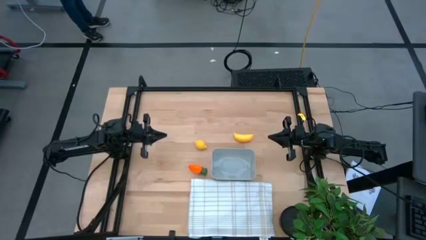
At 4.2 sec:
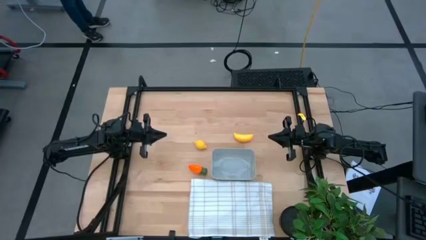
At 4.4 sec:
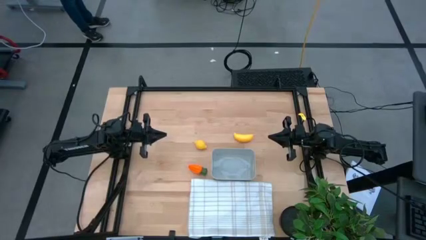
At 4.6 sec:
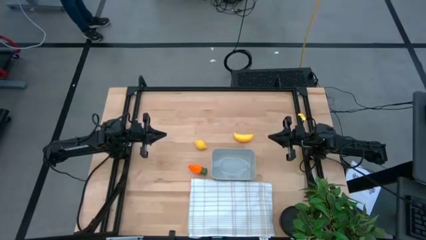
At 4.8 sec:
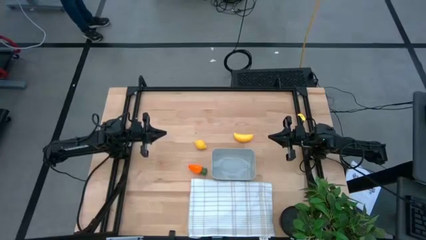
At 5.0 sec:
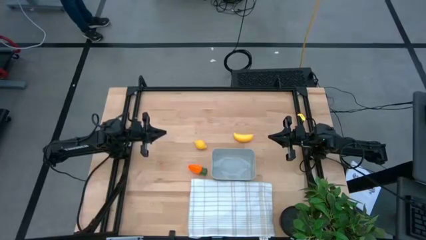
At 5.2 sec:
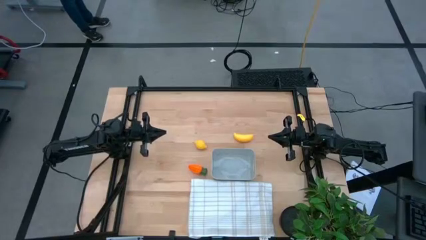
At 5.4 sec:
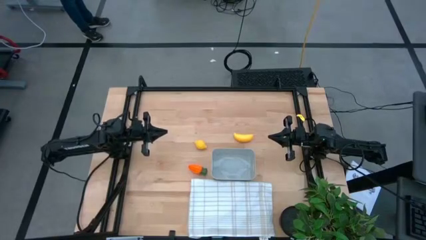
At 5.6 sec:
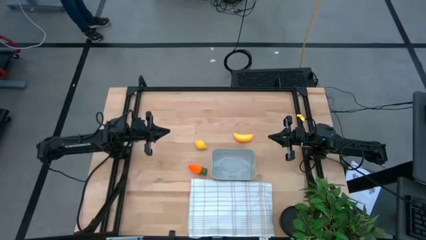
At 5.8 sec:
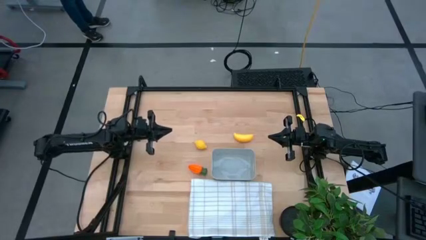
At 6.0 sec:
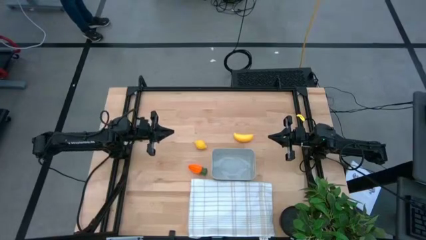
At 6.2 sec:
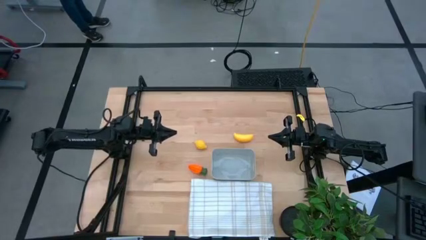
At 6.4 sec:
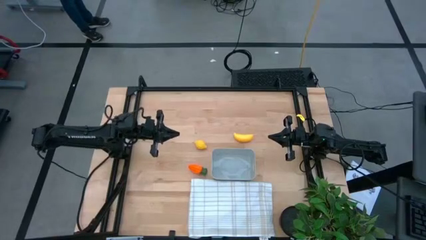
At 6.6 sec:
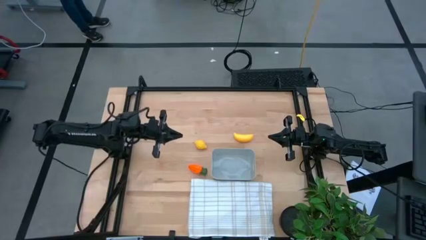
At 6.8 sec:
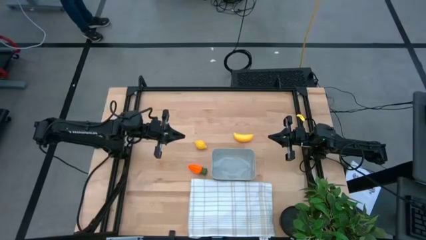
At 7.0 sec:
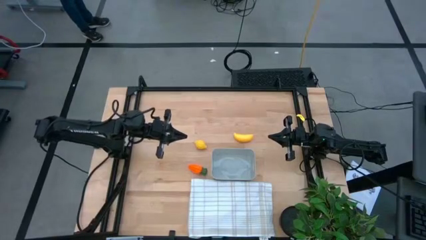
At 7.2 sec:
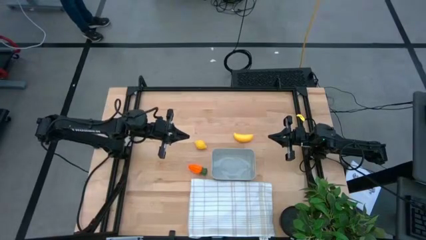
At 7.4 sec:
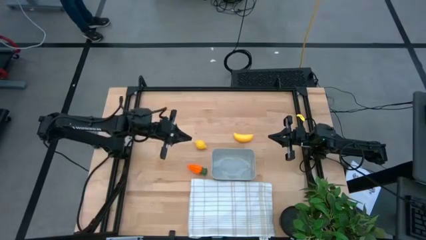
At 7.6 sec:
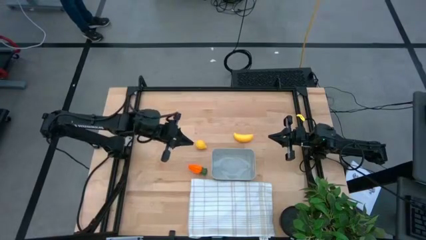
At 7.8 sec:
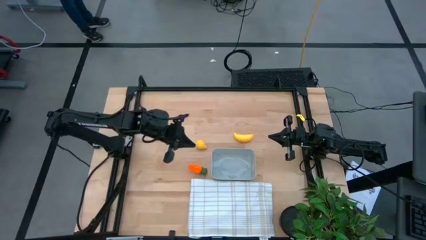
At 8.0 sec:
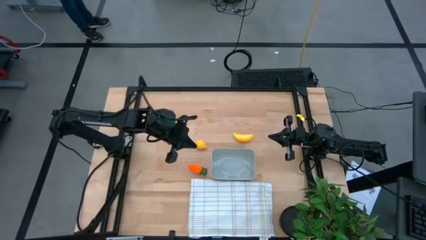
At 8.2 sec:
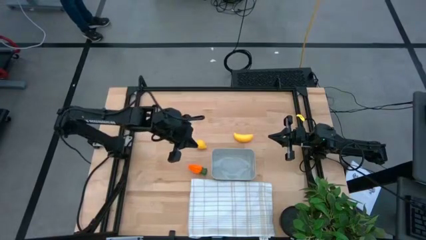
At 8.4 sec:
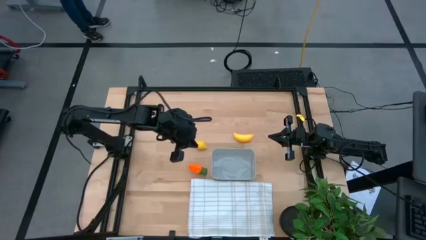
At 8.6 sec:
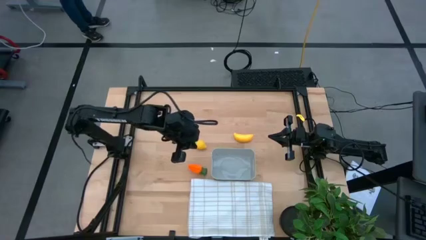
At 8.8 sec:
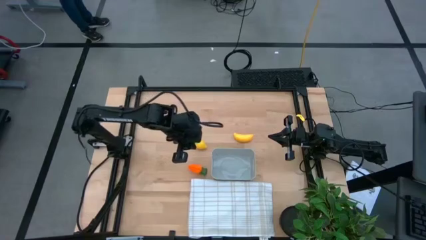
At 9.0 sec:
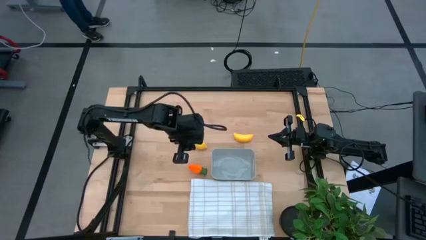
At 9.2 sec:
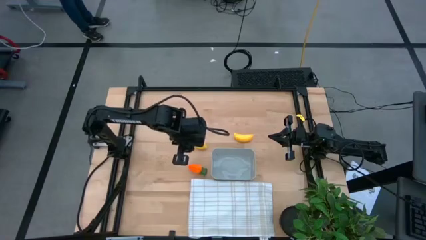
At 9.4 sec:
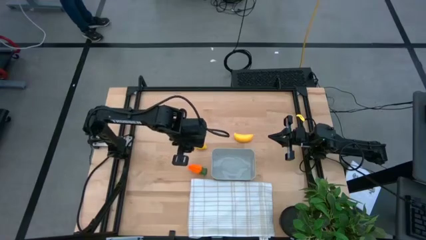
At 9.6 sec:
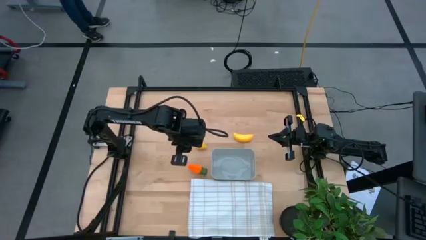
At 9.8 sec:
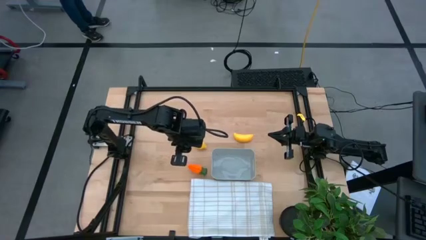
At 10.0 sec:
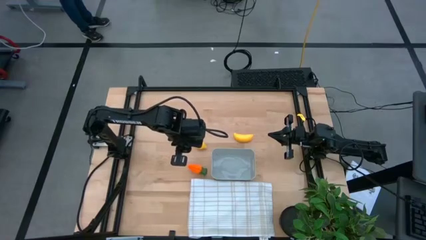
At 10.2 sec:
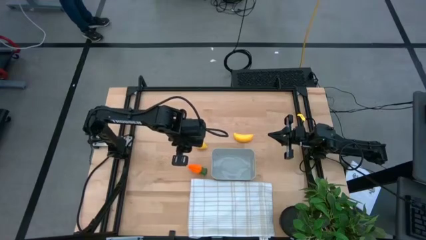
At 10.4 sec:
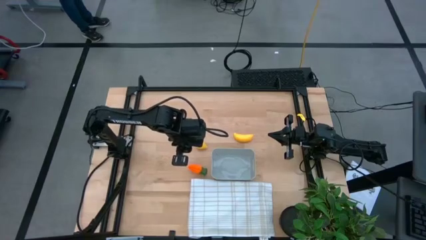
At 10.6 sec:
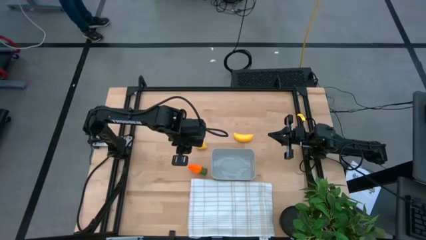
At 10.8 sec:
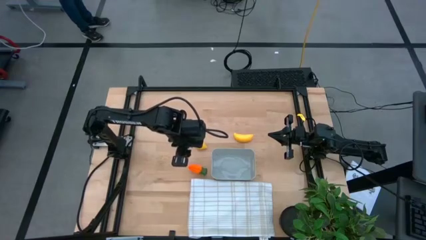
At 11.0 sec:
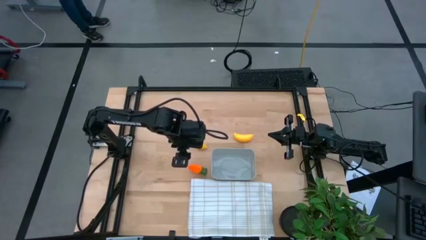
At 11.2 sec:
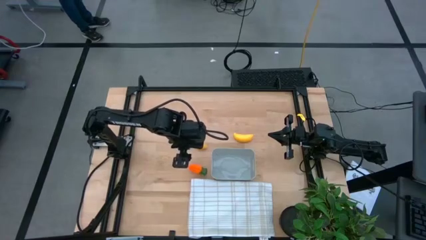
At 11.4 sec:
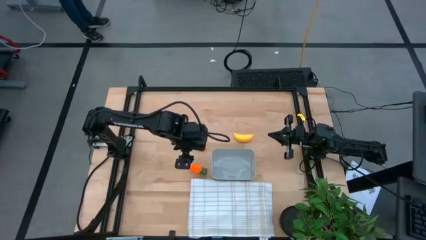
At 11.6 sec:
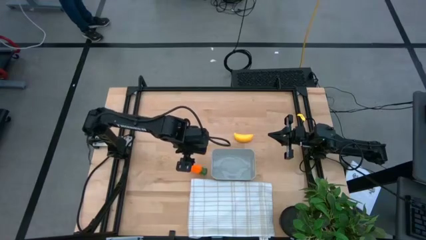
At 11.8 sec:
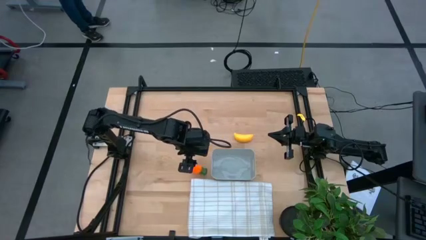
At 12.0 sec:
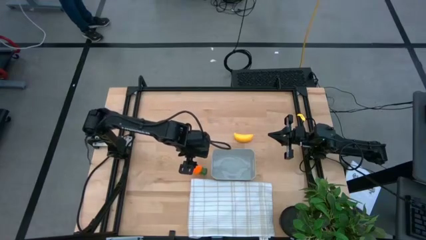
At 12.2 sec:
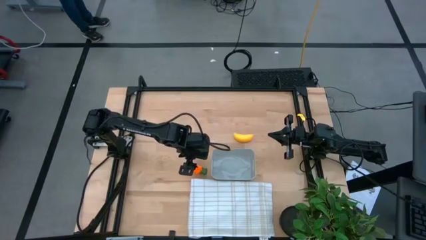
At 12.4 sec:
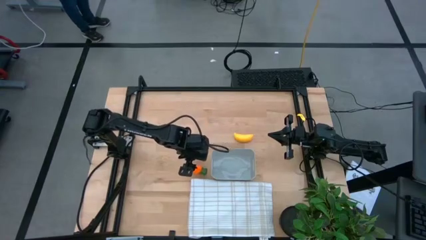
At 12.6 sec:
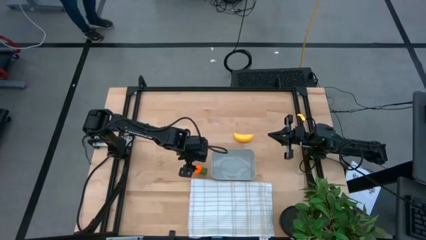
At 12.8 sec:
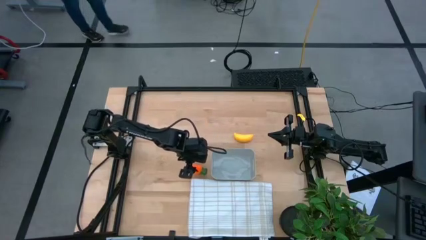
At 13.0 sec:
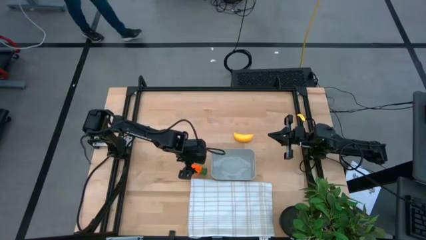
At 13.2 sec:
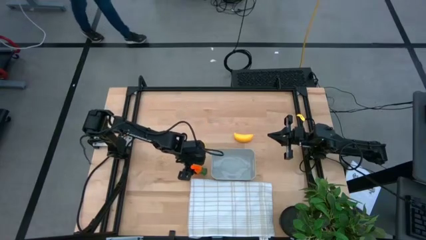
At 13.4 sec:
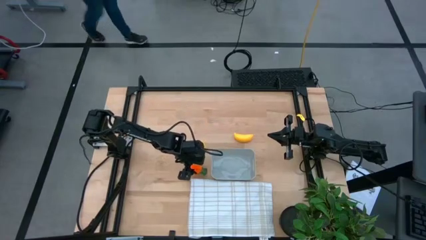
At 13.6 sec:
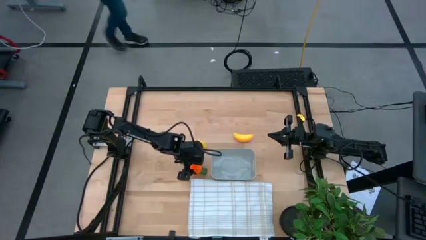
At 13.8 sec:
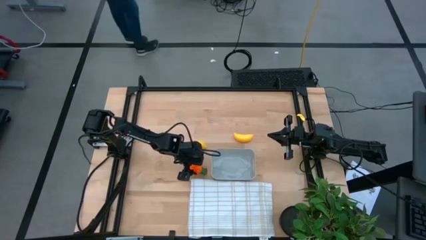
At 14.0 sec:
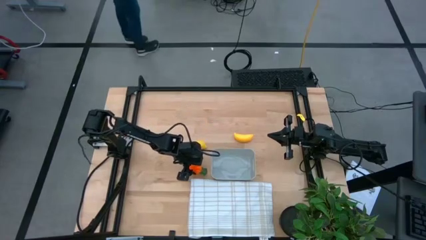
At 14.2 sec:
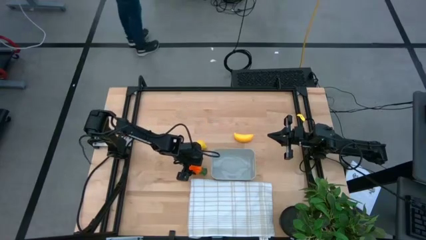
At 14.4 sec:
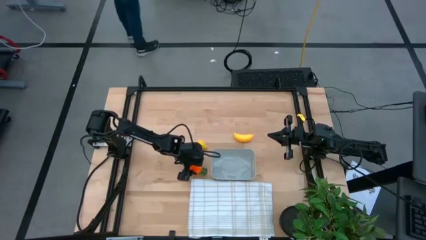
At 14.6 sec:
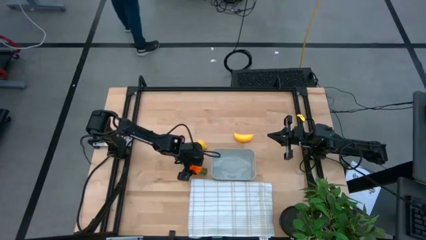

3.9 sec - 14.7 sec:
Task: Pick and placing Produce into tupperware
Put the carrot into the gray bin
